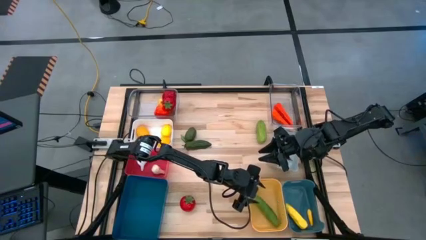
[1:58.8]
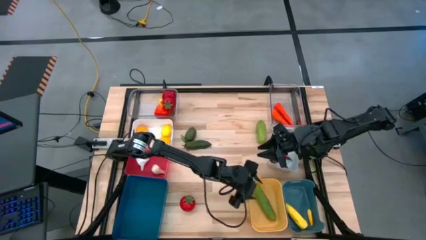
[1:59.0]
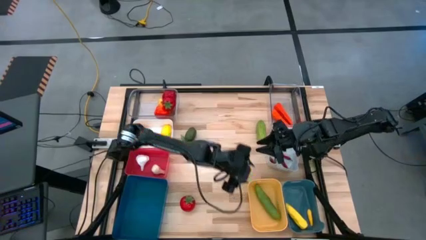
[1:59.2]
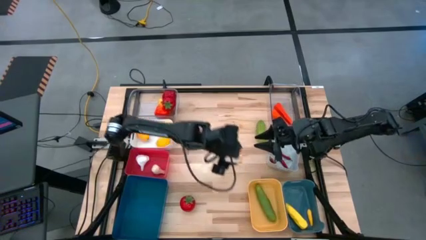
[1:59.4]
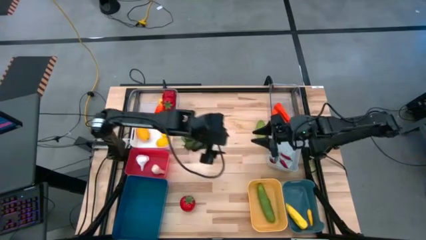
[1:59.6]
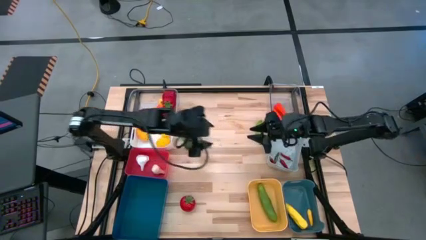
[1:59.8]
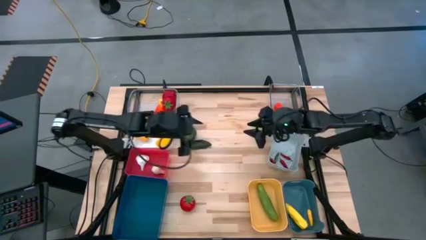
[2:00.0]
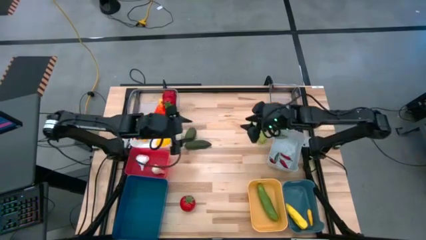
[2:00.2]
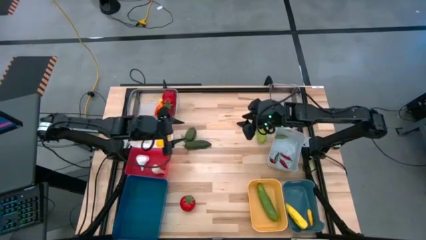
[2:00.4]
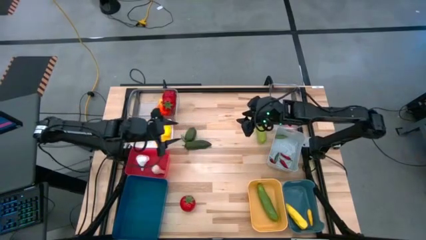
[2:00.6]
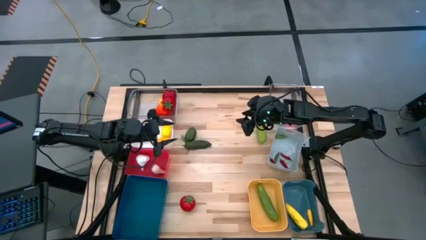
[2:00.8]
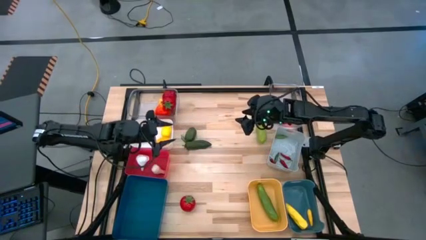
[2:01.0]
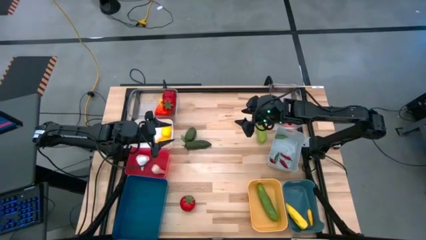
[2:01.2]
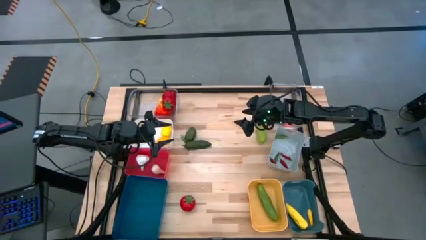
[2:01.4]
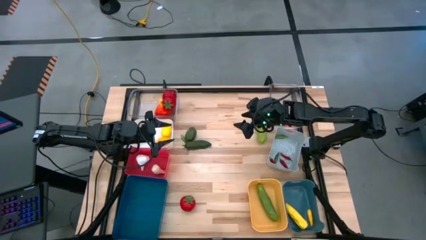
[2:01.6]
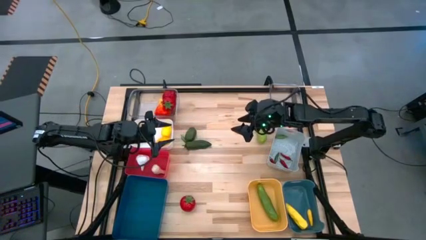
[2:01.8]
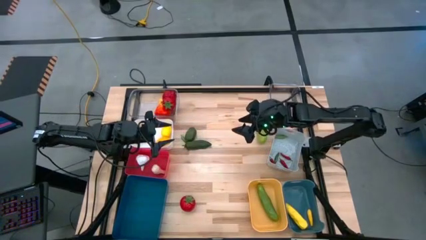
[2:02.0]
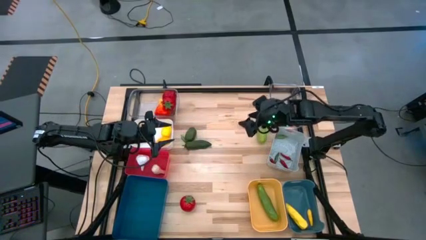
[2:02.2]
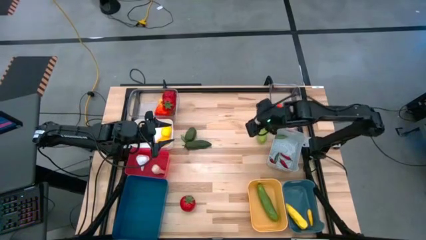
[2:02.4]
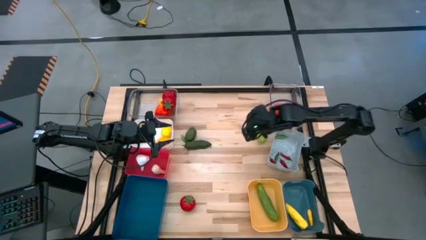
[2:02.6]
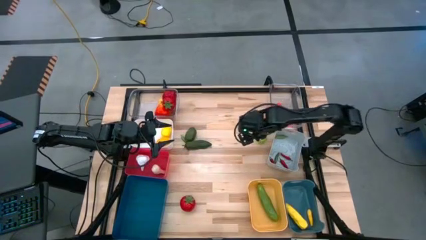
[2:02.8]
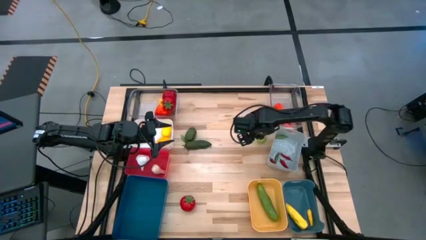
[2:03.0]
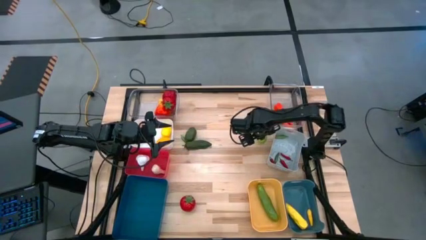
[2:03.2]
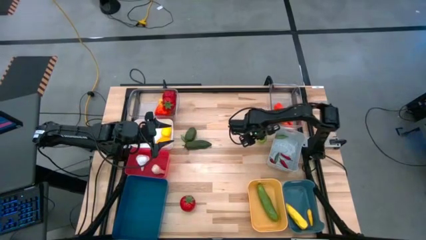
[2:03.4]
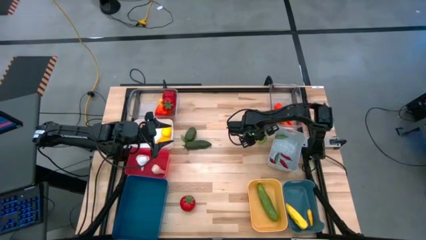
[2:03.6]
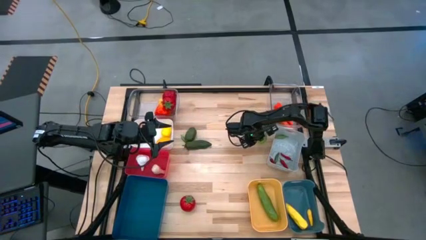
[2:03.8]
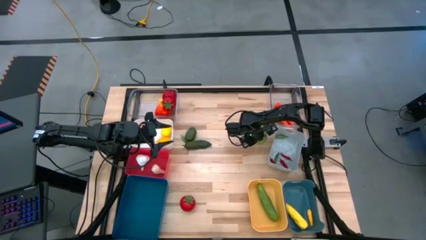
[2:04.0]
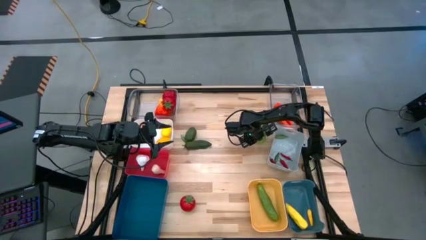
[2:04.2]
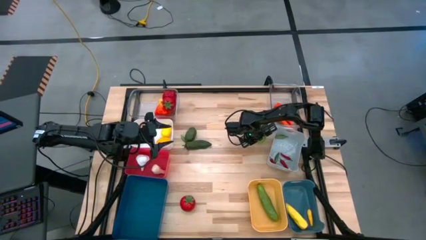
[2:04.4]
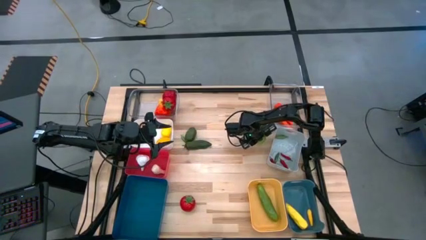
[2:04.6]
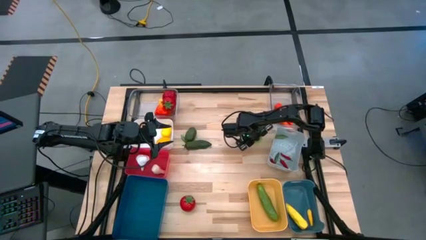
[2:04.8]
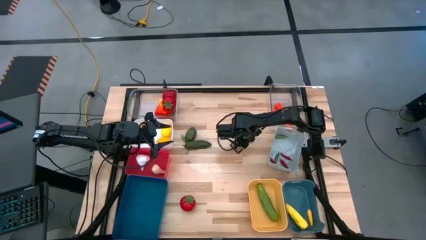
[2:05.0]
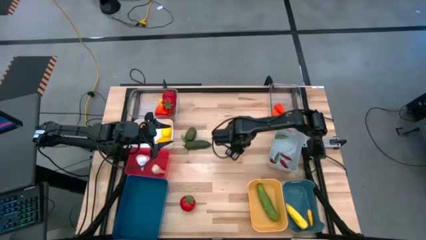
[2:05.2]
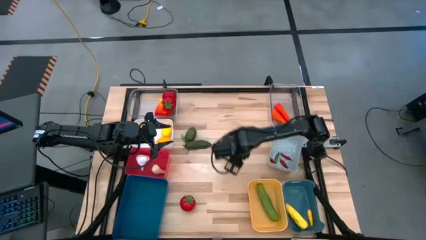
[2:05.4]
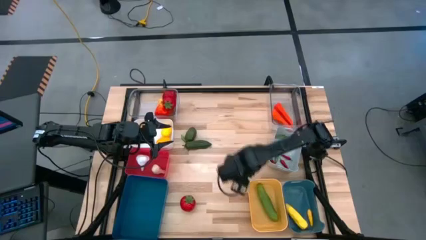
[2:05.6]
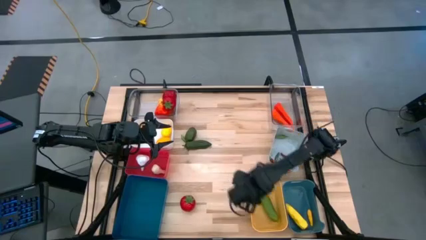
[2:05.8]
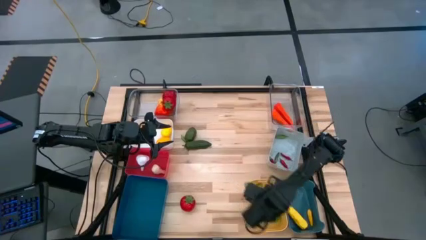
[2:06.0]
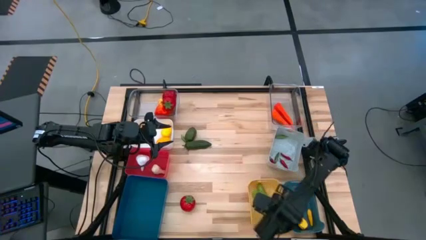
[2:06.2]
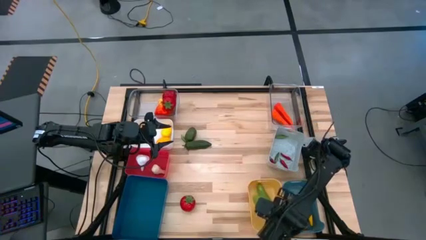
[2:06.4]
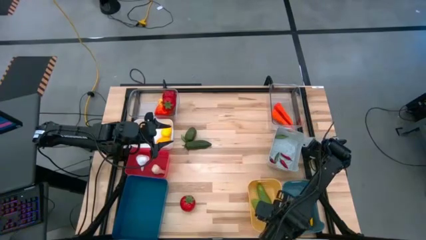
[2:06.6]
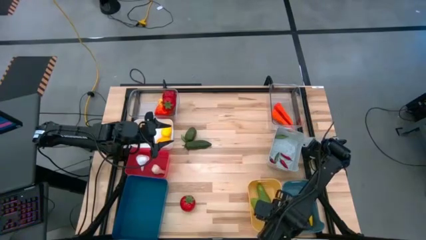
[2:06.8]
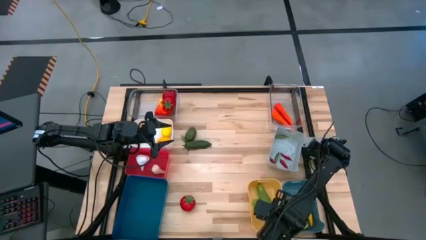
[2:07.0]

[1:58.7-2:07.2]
Task: Sort produce into baskets
Put the green cucumber into the yellow bin

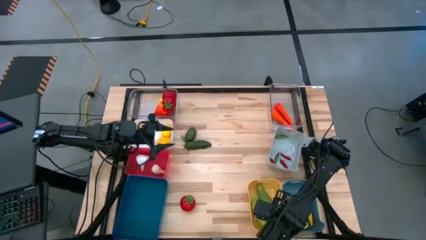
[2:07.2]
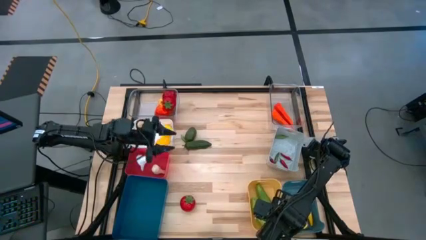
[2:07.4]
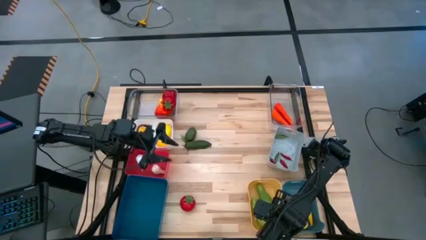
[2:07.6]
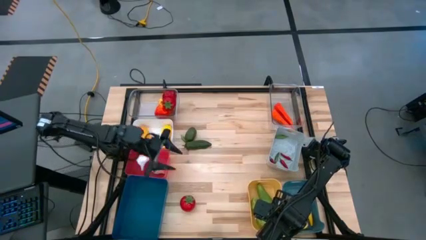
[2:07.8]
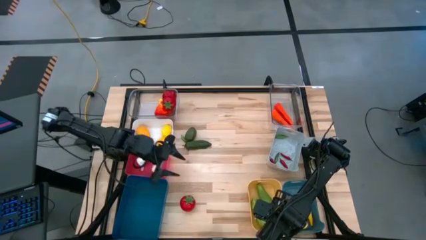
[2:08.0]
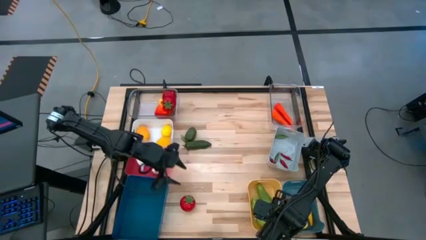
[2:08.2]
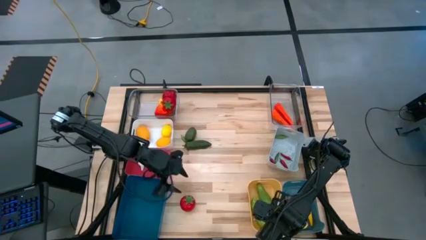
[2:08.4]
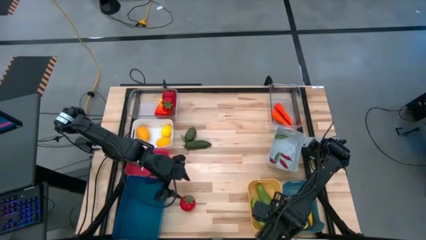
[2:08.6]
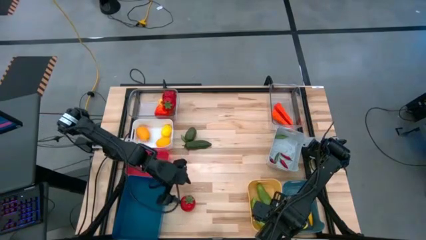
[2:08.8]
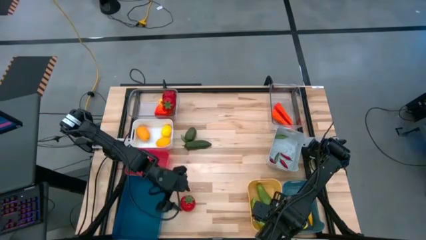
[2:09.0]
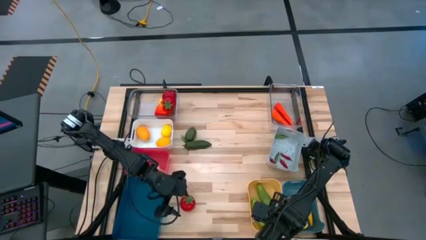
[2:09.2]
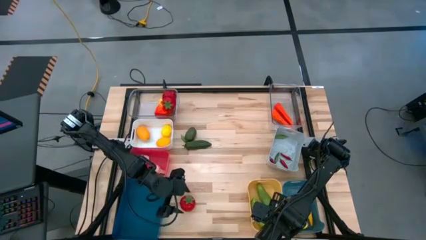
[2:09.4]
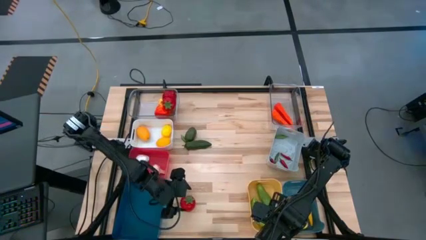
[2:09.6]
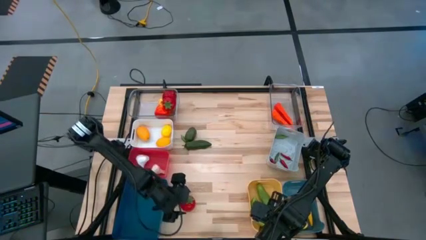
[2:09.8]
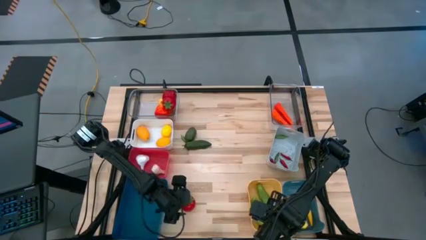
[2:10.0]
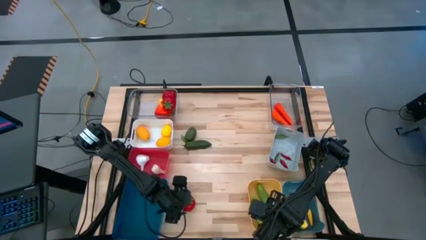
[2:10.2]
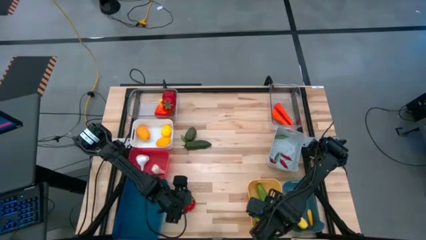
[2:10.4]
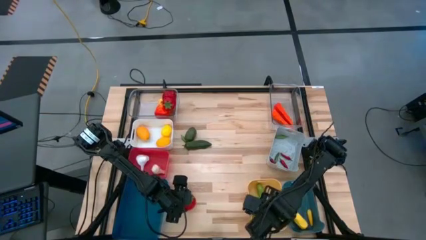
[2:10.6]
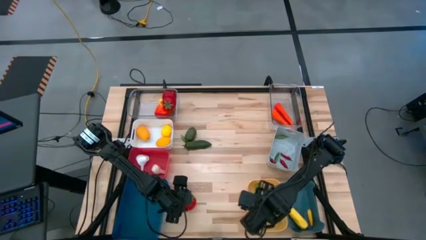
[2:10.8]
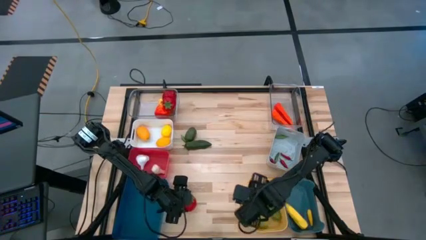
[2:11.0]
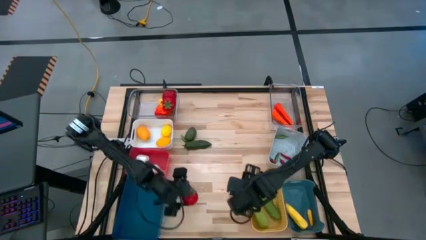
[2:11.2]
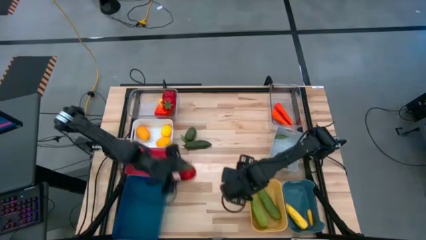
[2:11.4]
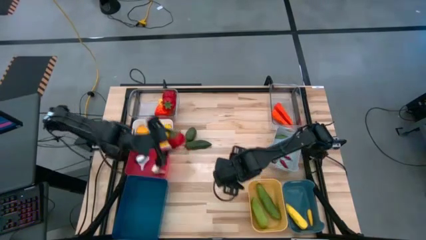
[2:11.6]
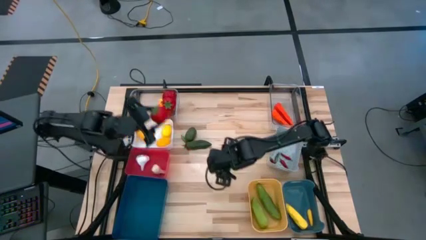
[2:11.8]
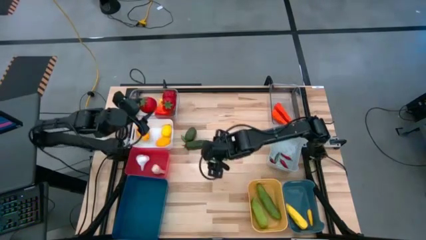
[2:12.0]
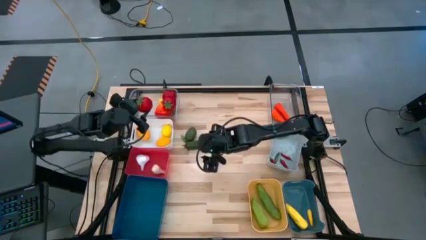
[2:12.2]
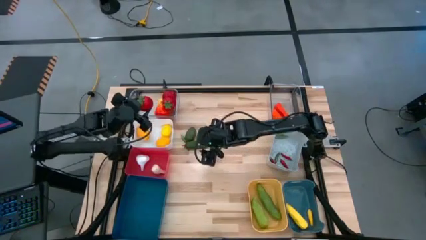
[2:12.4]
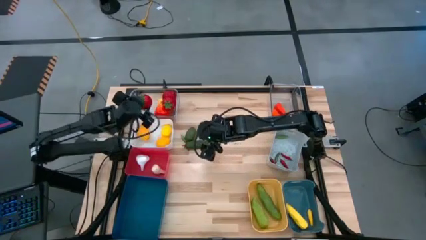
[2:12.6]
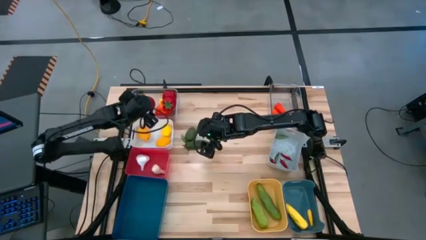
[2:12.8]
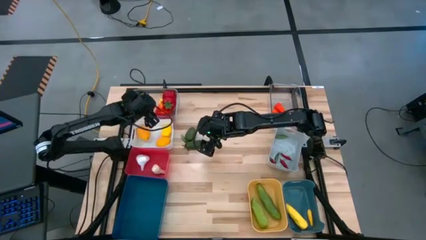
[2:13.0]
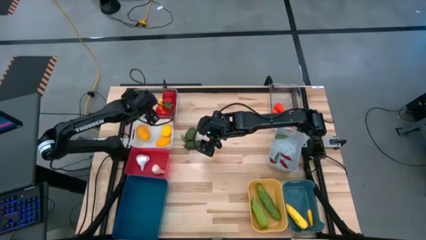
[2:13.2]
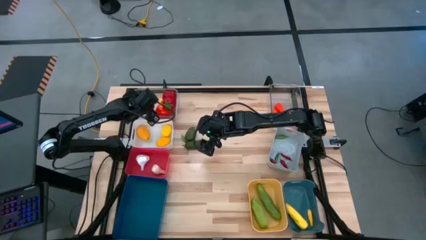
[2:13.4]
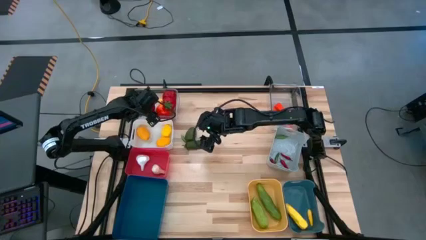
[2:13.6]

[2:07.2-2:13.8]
Put the red tomato into the left transparent bin

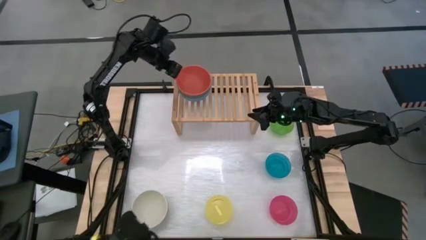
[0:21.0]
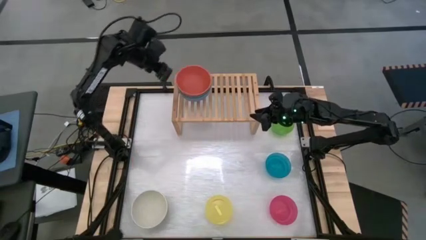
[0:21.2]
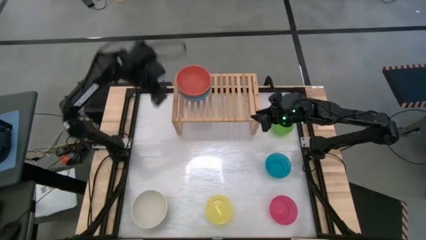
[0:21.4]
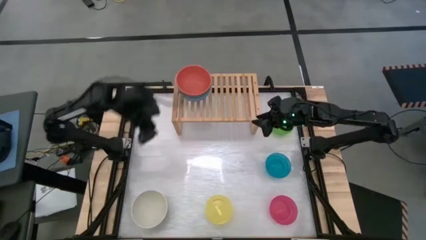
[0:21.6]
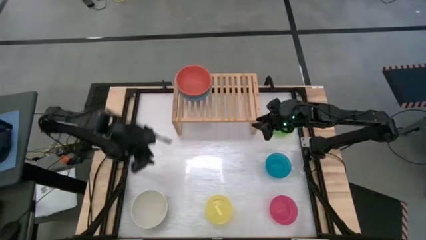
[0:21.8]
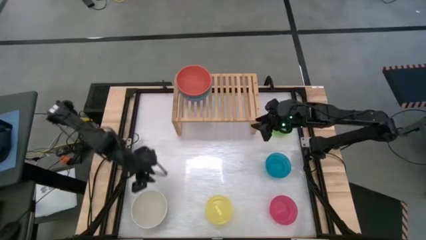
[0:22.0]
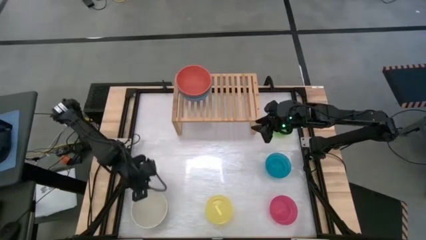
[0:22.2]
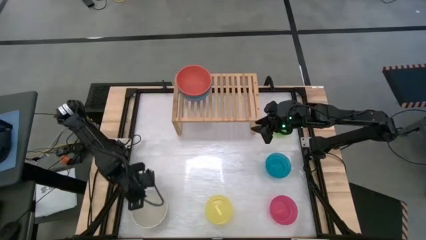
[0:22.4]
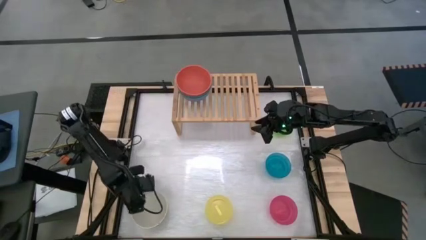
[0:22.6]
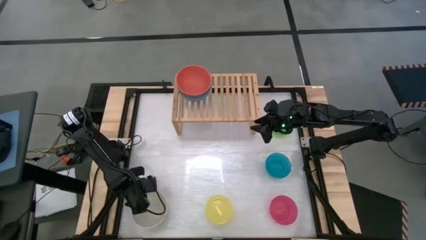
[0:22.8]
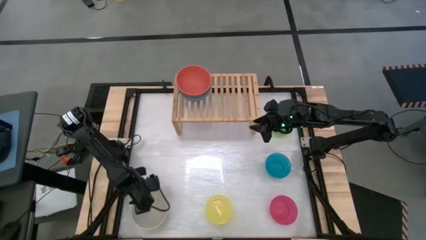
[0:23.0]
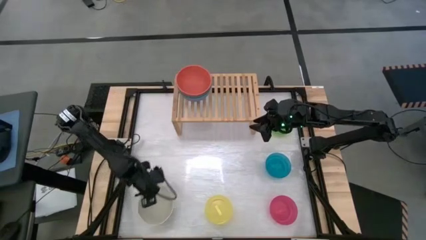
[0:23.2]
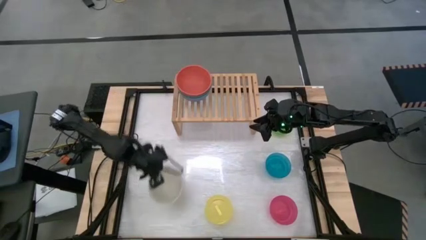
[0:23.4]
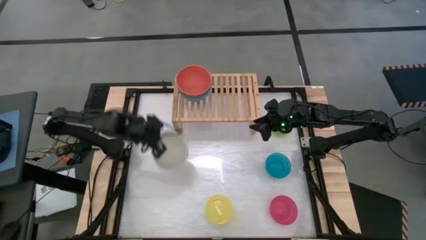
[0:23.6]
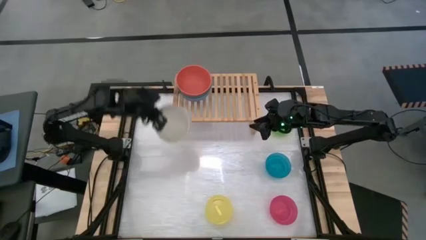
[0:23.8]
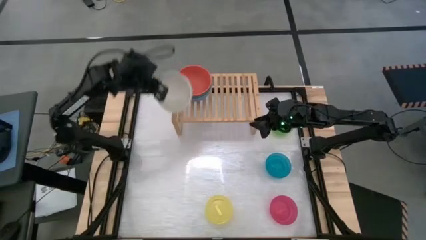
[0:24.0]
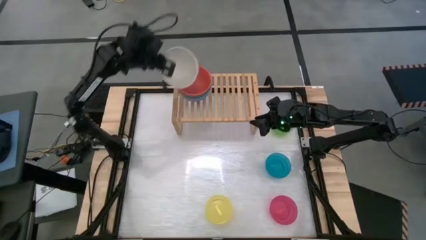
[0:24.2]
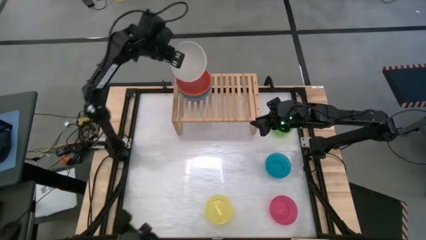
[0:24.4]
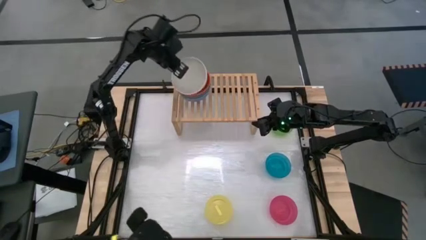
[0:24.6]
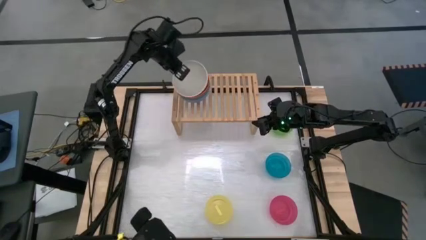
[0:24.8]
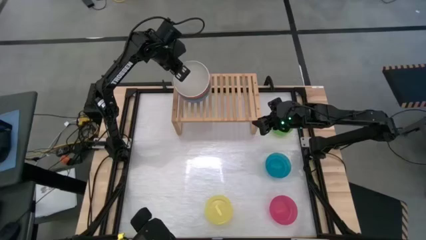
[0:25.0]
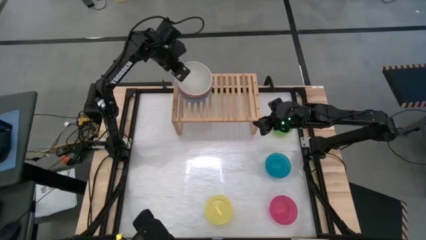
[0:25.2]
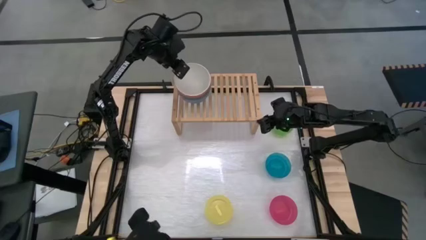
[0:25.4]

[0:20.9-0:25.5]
Task: Place and stack bowls onto a shelf
Stack the white bowl onto the orange bowl on the shelf
